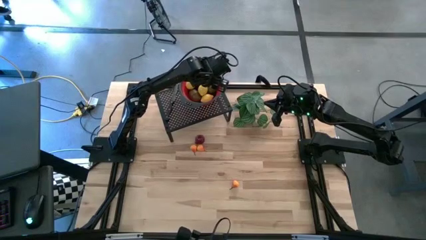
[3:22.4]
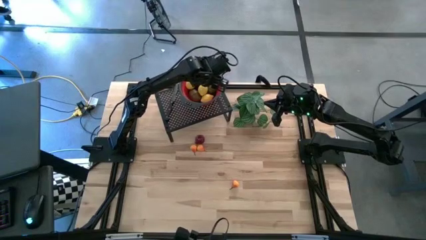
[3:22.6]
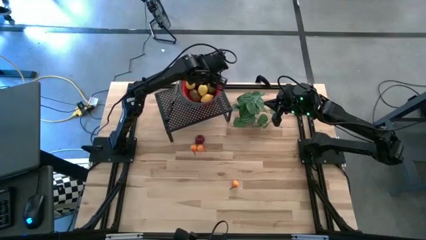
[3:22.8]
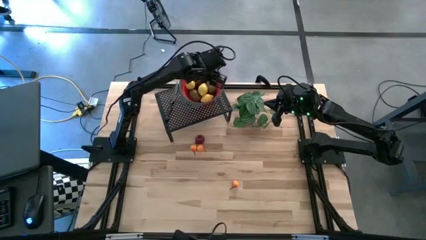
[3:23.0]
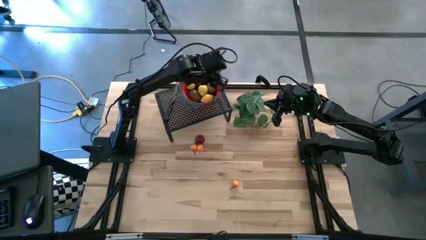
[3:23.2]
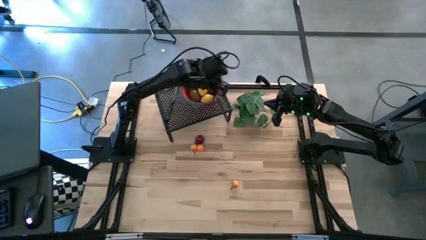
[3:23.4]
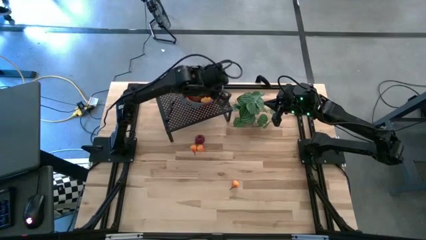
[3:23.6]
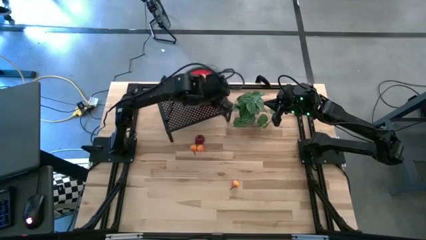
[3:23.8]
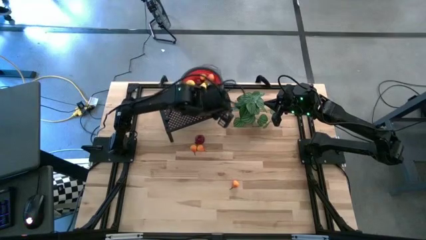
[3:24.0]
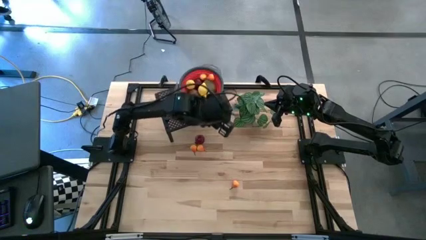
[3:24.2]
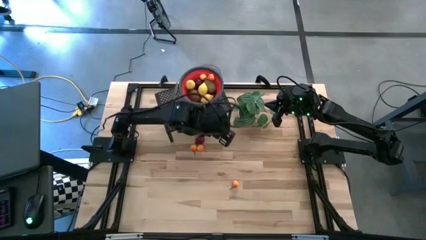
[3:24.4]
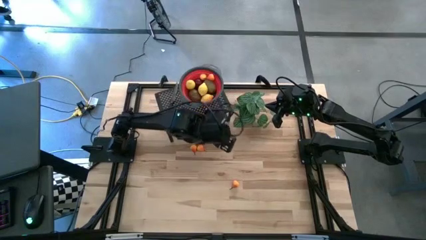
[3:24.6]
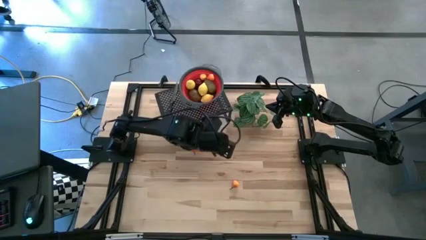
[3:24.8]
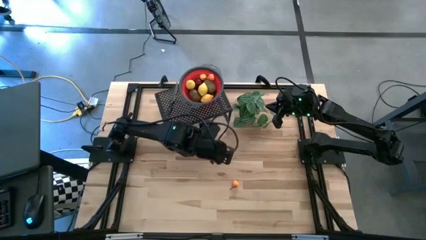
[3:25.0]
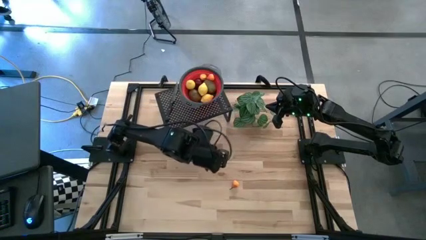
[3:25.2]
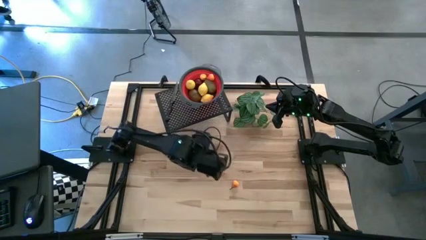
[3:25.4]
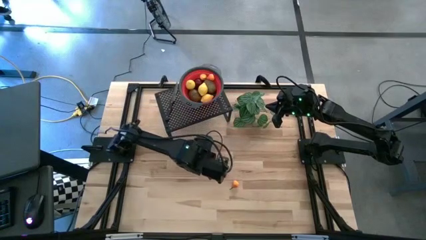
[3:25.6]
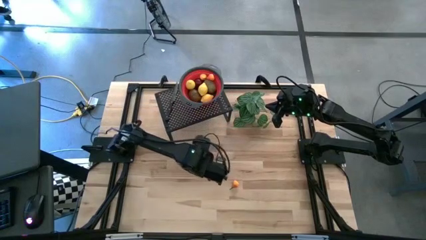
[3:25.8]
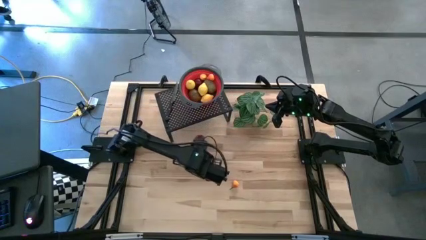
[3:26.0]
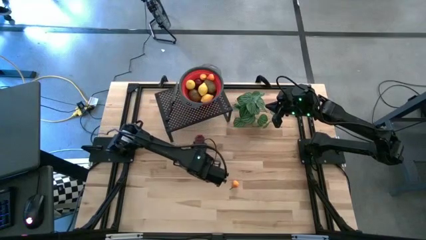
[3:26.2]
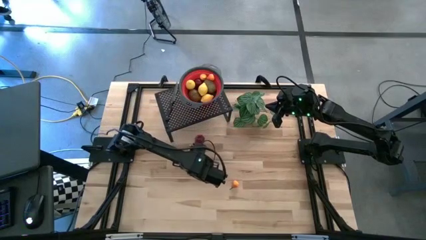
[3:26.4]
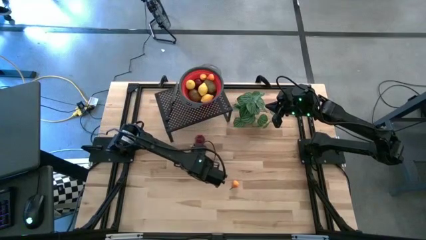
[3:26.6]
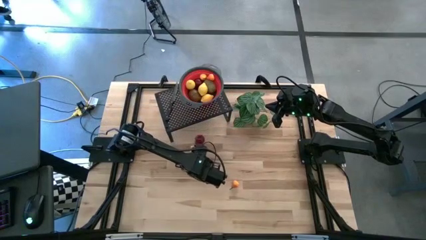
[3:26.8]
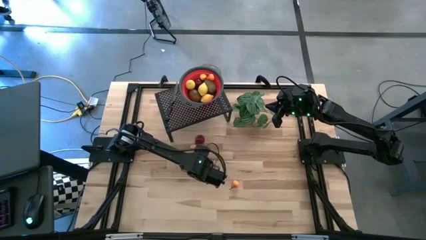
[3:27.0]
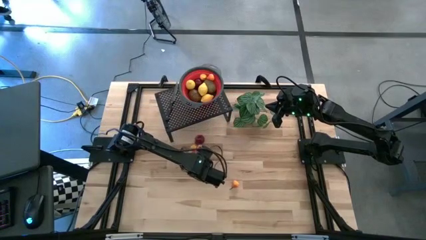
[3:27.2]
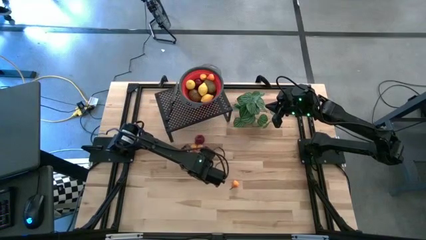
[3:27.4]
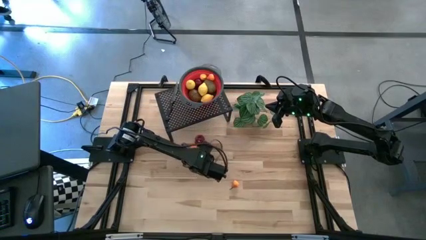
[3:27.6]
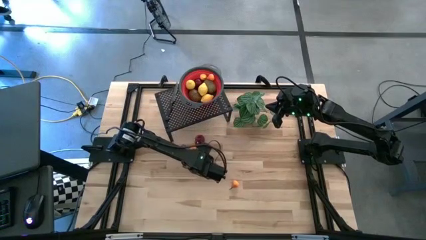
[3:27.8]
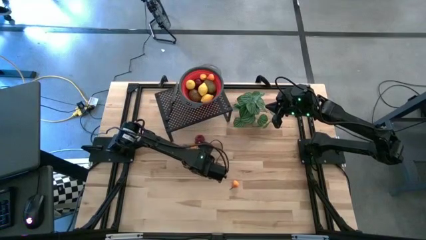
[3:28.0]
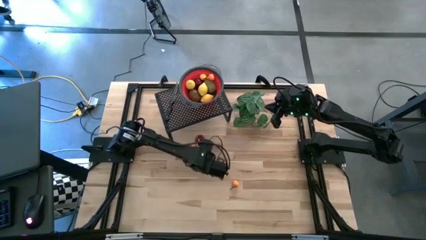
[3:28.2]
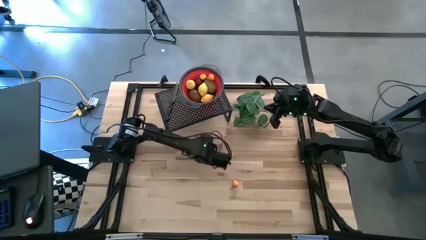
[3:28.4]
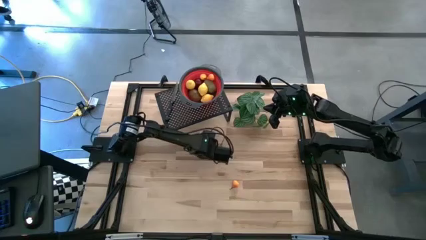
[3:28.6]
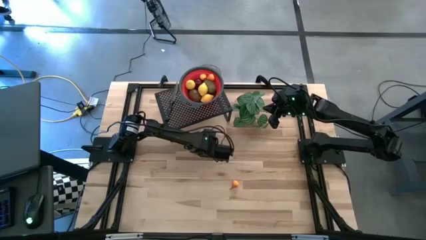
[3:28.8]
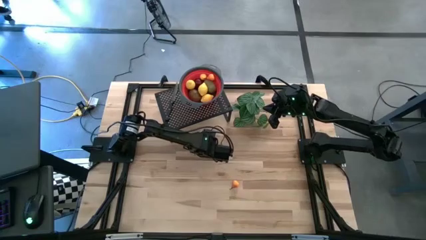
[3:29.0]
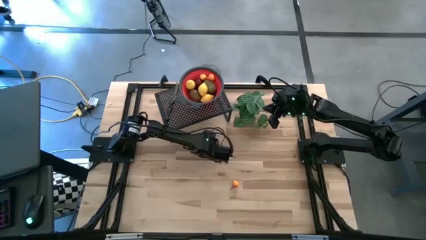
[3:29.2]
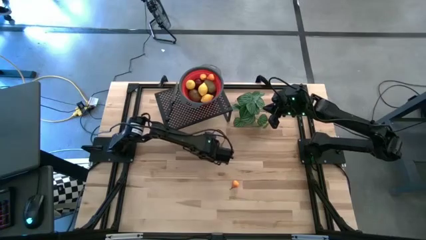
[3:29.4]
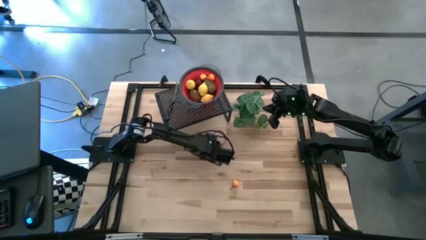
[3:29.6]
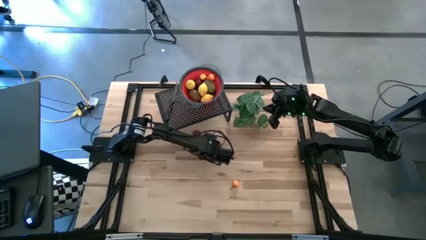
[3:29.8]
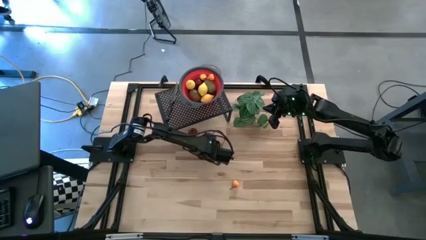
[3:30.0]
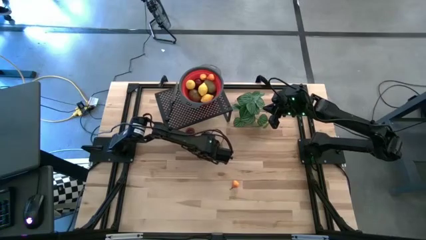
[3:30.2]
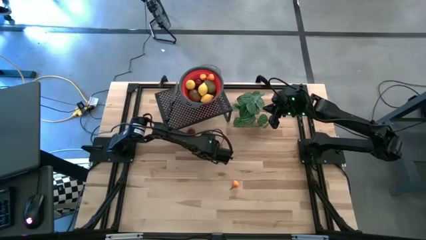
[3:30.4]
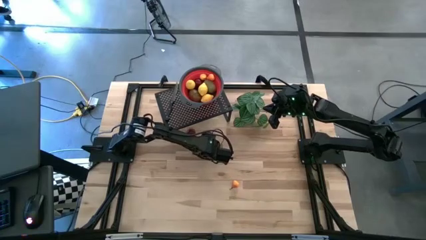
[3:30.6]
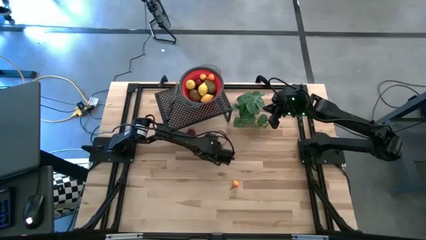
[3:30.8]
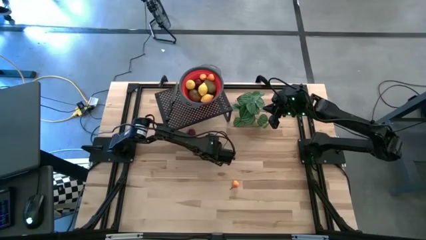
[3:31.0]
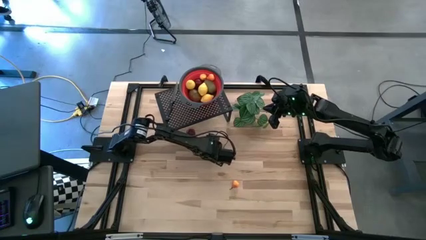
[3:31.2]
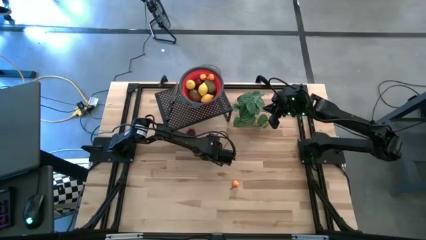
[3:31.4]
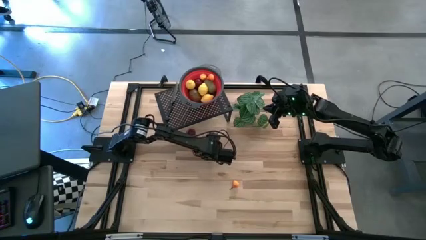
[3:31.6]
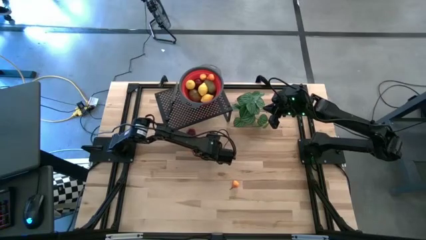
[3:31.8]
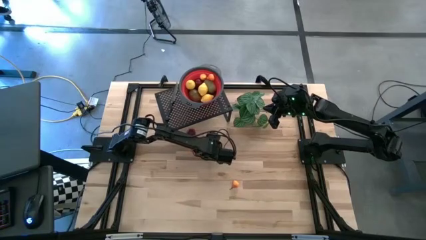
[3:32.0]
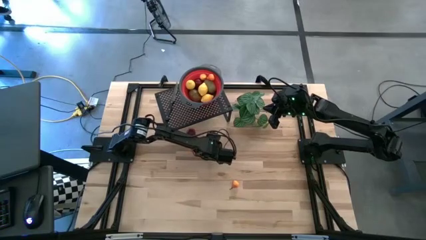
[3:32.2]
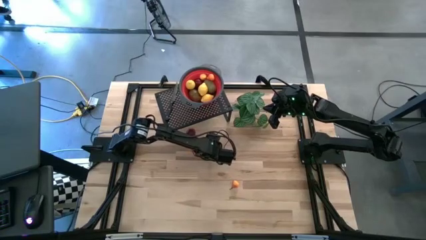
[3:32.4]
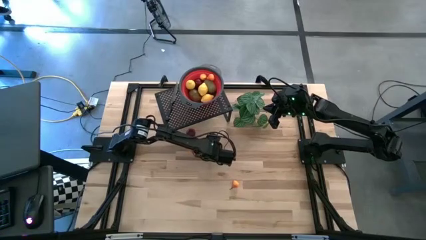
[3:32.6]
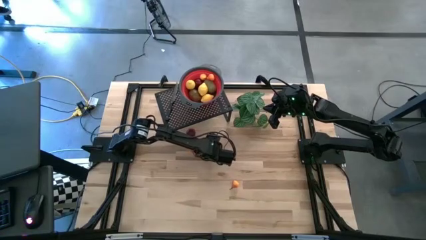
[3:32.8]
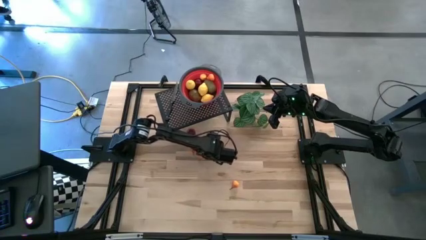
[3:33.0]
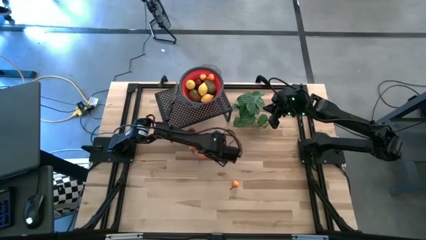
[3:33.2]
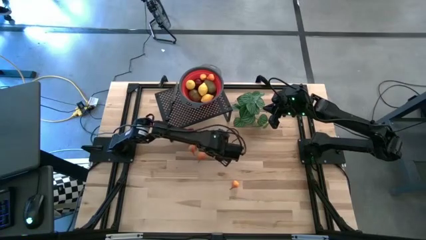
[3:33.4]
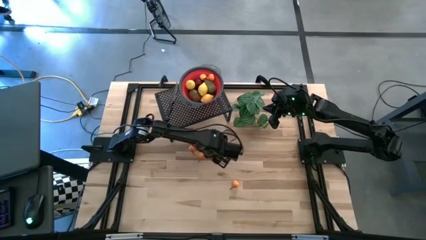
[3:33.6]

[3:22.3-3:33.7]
Task: Pick & Place Fruit
Put the orange pear into the red basket on the shelf
